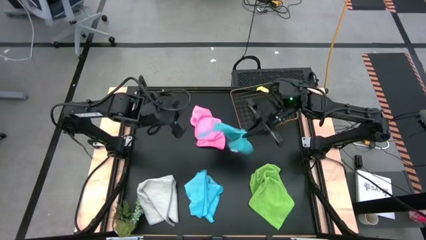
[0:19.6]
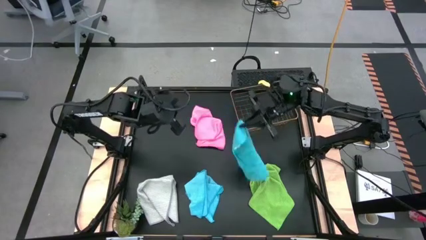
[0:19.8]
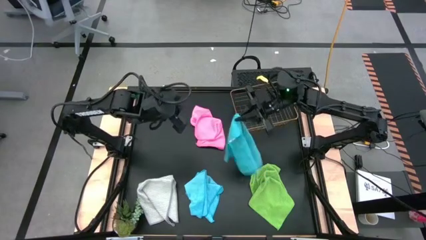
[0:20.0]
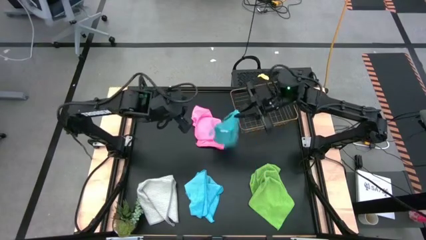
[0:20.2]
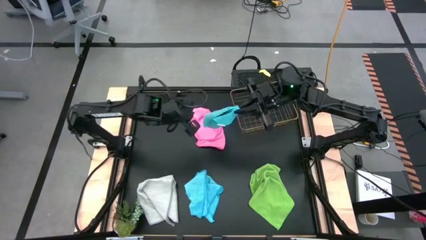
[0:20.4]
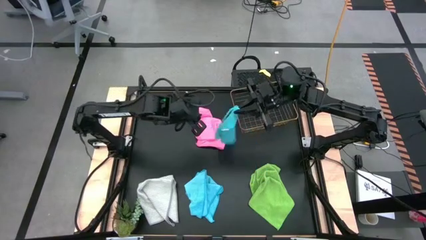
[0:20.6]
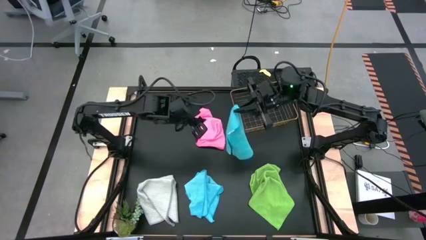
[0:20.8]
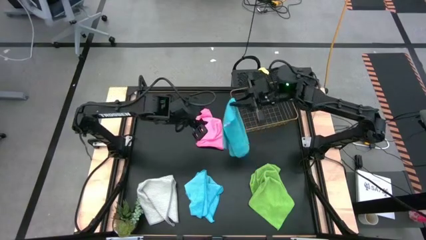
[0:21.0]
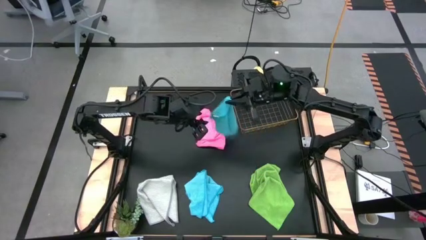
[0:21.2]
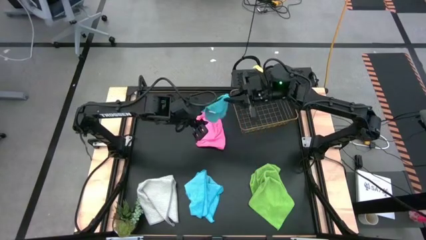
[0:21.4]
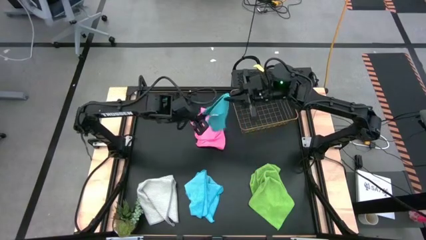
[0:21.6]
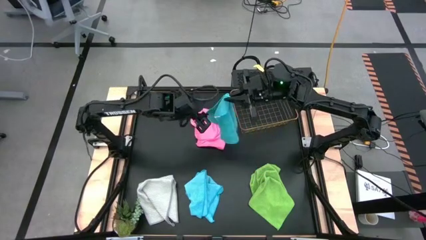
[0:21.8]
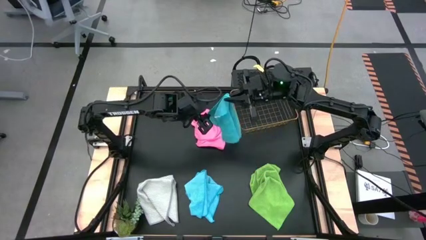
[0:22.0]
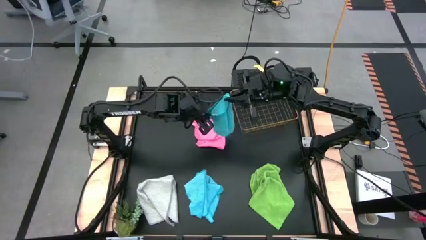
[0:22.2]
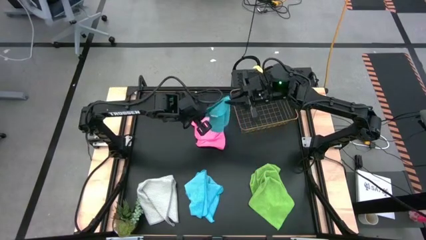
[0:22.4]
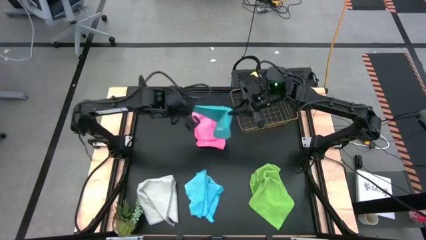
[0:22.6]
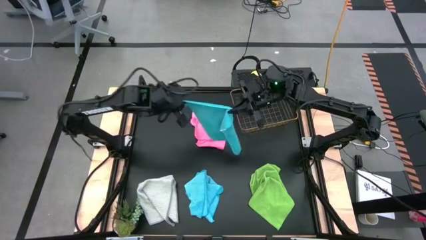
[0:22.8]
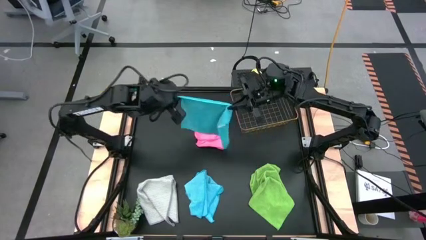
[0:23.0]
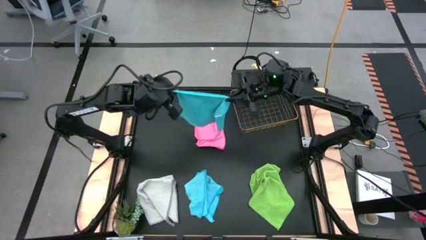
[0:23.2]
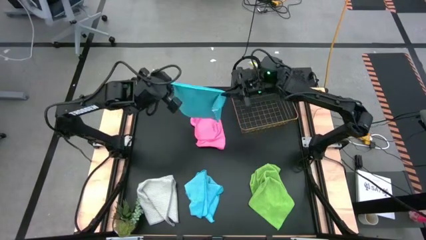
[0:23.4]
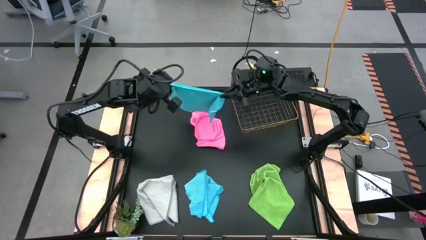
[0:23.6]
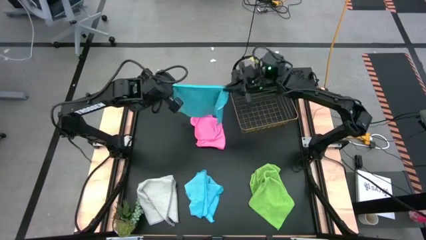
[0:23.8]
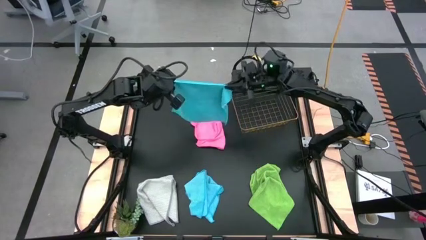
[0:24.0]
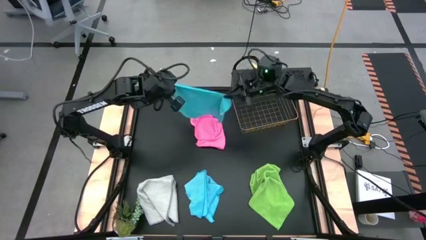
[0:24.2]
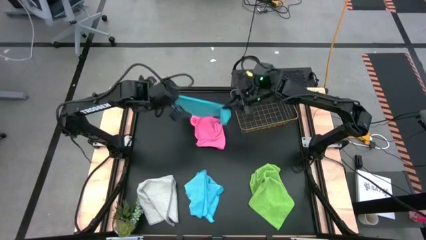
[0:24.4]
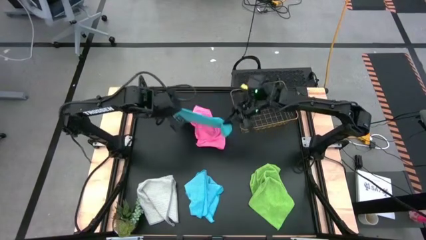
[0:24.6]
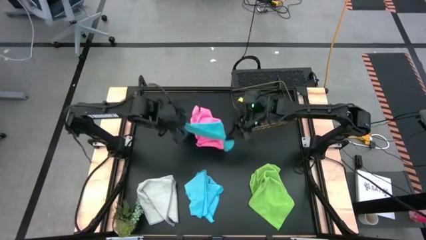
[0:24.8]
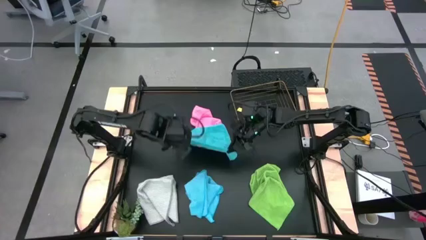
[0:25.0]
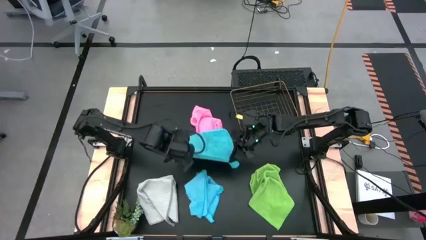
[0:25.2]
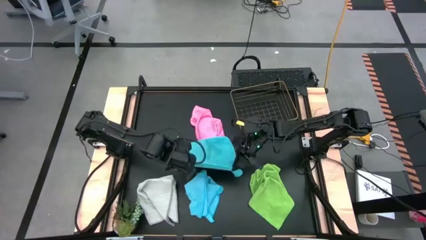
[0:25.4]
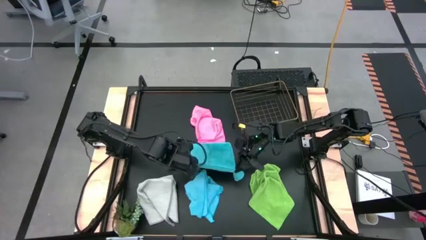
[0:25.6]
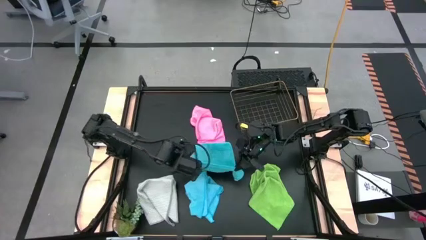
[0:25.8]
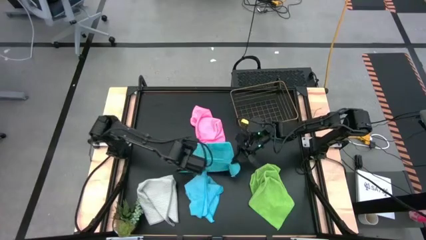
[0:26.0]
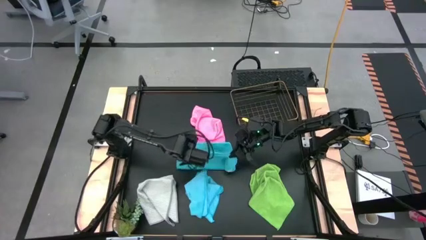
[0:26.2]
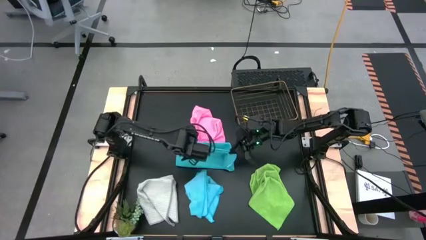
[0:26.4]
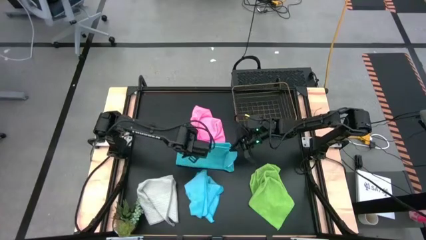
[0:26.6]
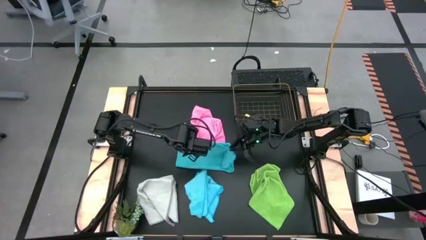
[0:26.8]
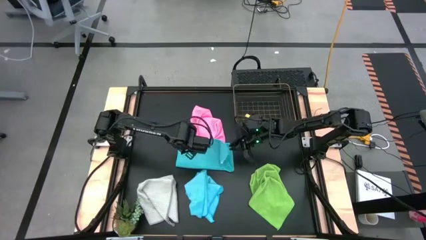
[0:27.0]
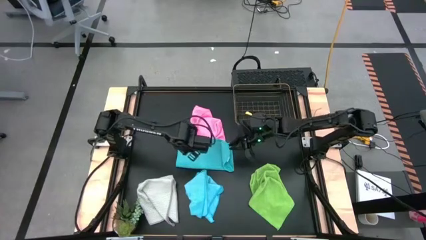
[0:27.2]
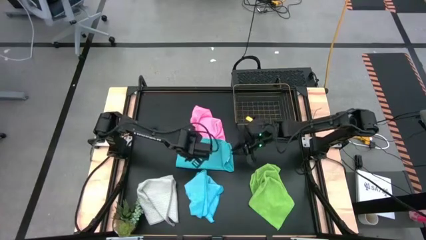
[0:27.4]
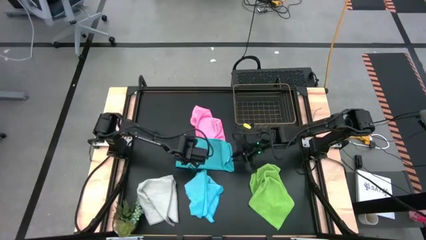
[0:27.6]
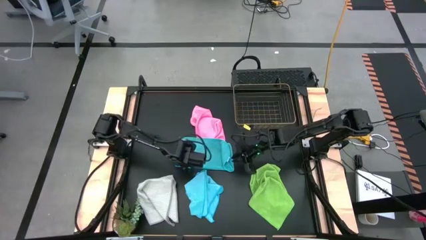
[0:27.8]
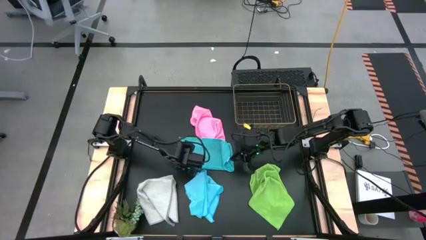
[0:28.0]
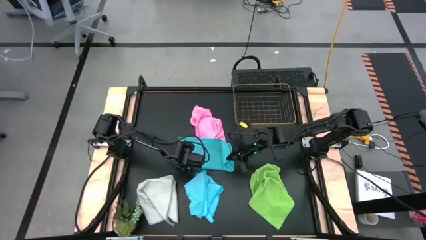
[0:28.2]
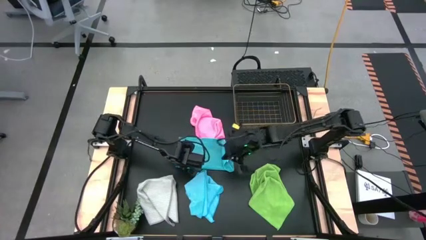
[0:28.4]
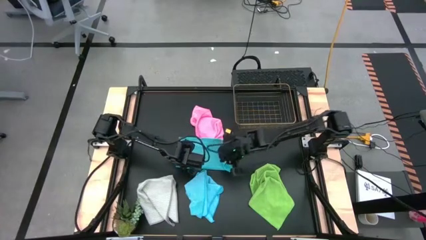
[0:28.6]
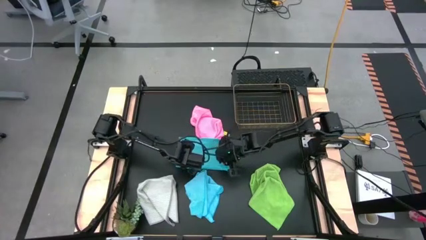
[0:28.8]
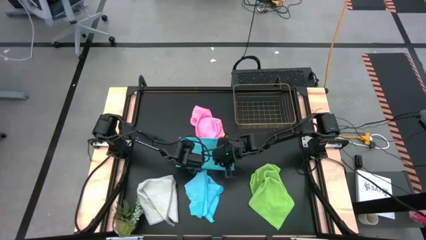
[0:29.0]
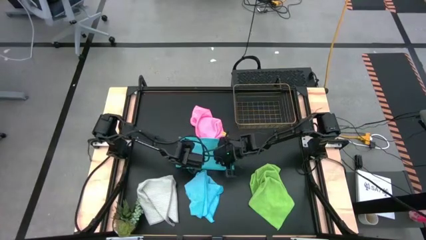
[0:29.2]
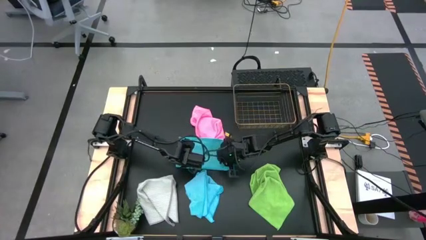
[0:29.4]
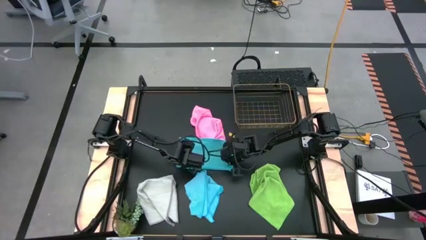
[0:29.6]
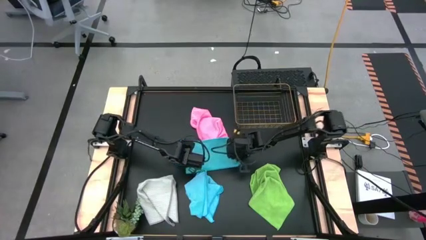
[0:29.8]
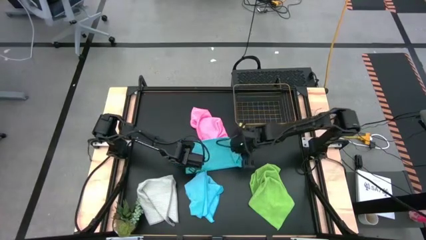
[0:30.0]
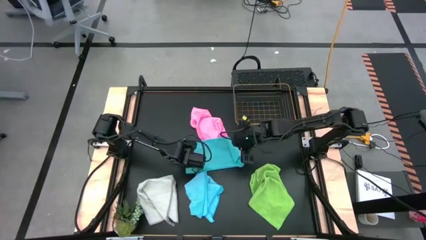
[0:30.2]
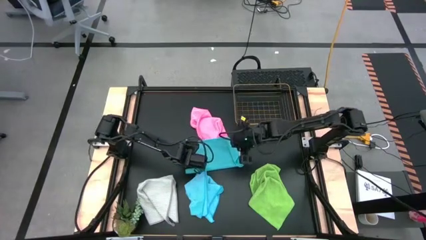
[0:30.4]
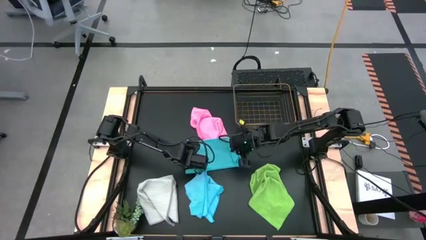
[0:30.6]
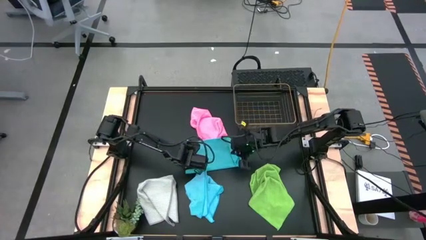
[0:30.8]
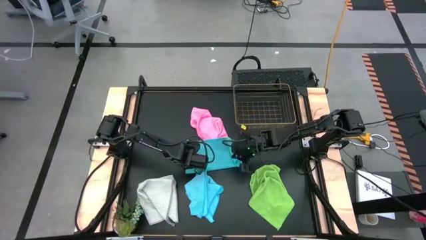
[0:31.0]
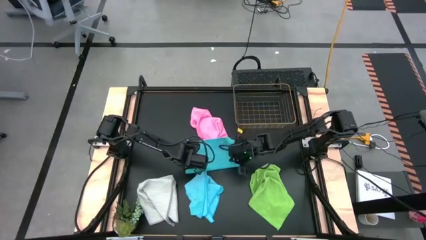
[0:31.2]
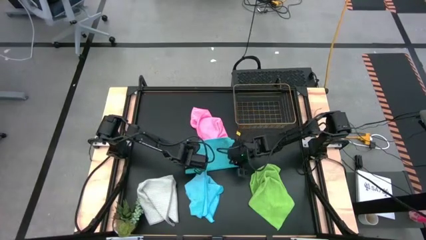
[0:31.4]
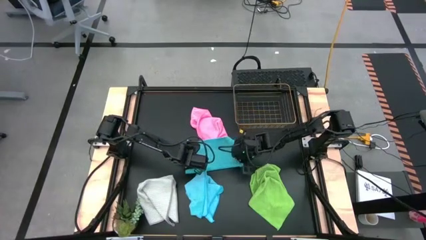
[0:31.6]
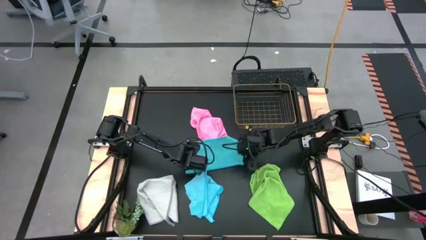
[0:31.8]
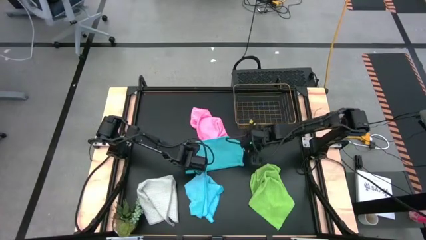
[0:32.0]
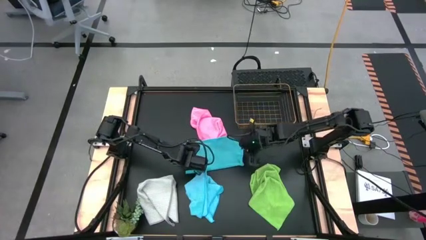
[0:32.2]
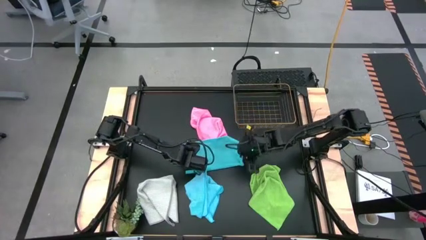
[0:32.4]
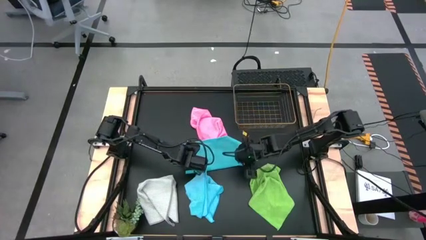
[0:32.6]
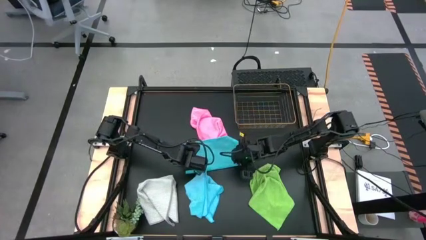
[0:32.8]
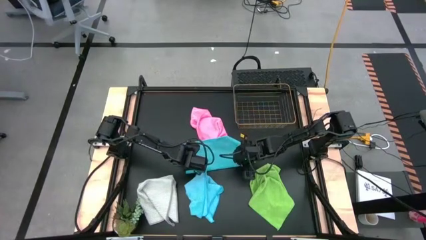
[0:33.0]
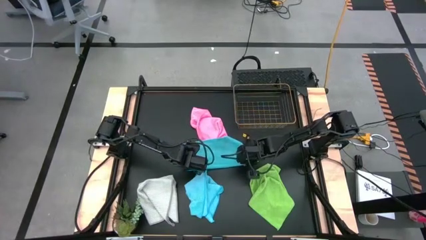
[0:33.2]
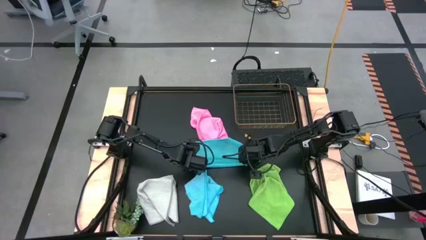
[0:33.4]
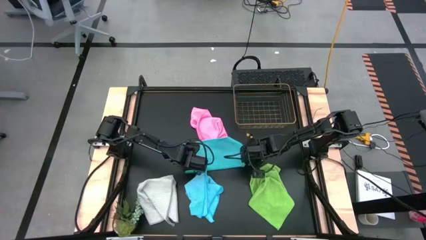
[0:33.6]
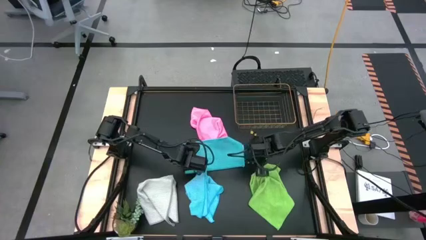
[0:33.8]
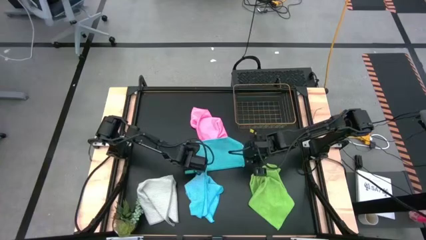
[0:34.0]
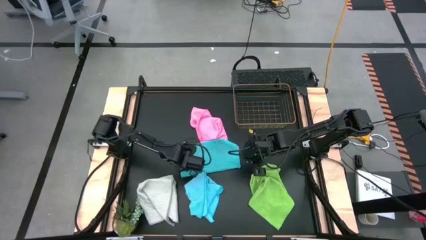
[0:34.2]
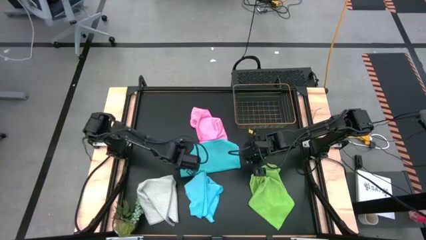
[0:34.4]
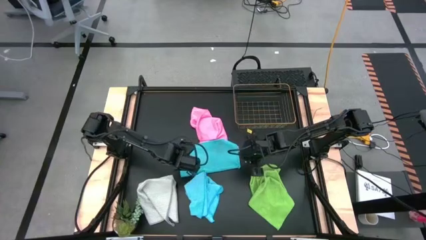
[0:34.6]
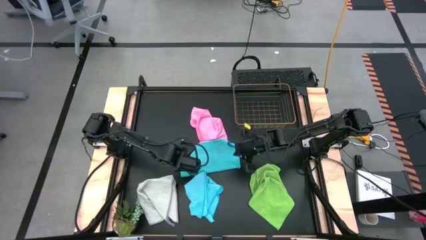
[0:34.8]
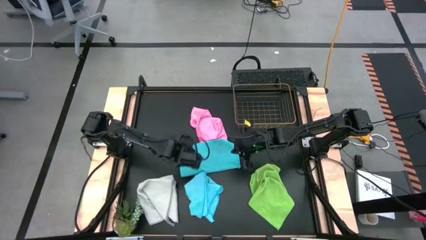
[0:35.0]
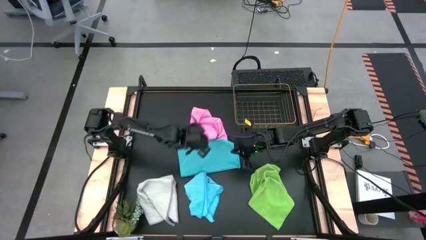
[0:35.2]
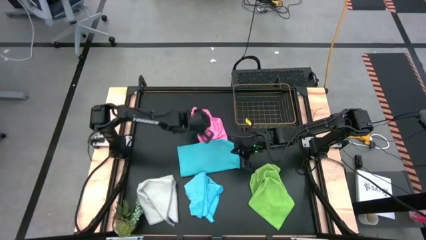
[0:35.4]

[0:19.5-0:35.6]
Task: Fold microfiber towels
Fold the top blue towel
